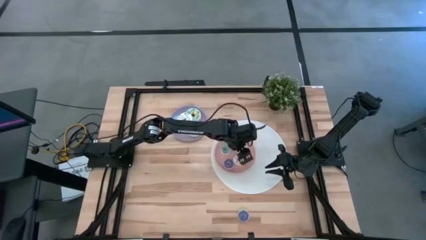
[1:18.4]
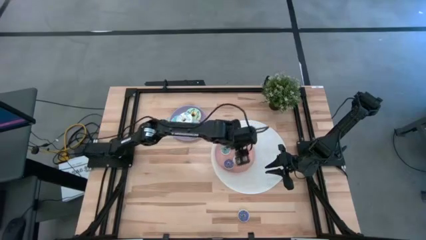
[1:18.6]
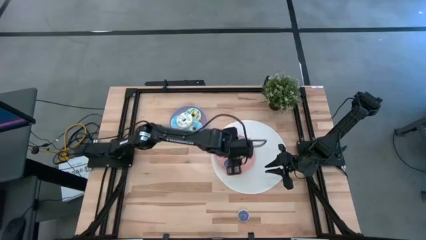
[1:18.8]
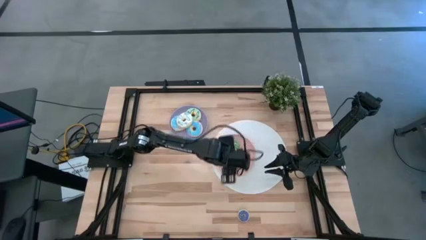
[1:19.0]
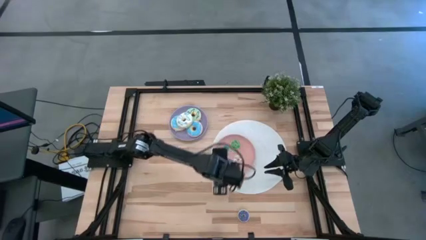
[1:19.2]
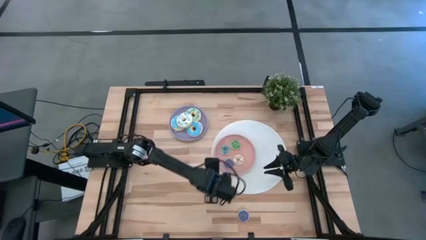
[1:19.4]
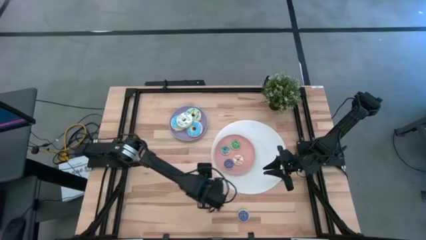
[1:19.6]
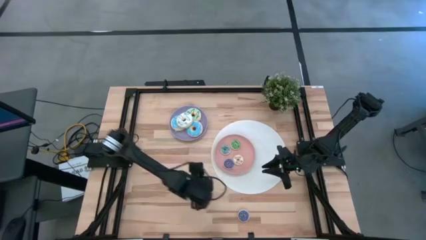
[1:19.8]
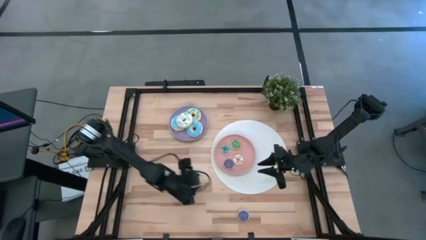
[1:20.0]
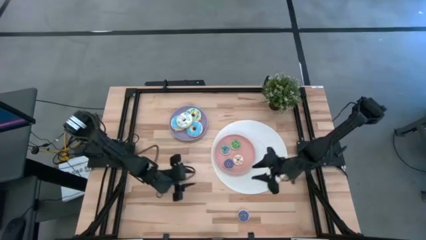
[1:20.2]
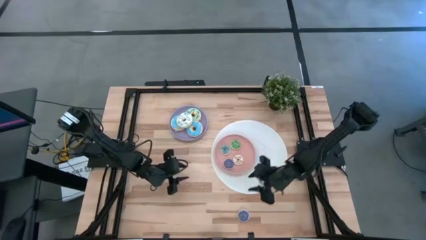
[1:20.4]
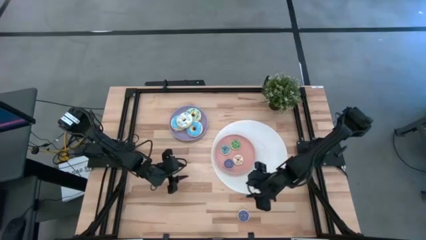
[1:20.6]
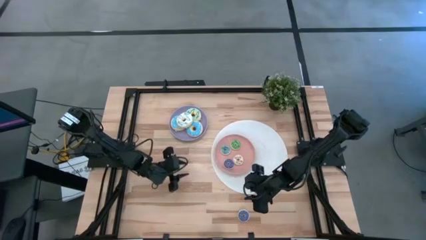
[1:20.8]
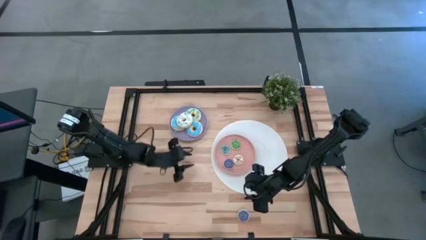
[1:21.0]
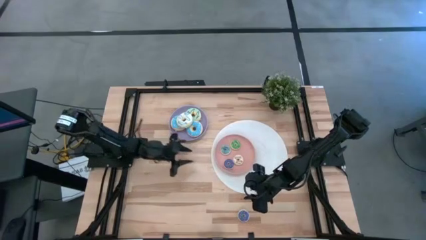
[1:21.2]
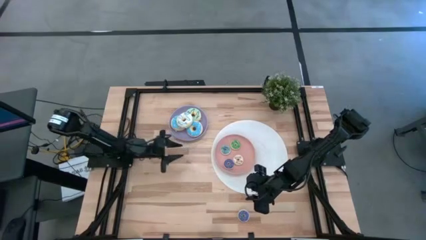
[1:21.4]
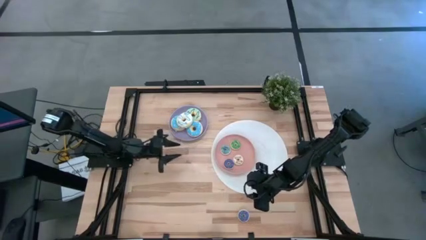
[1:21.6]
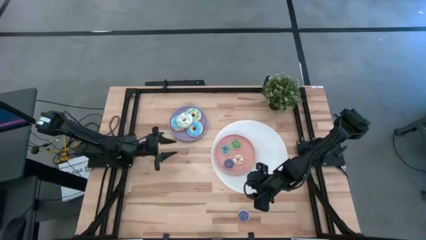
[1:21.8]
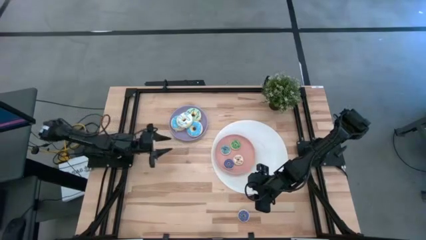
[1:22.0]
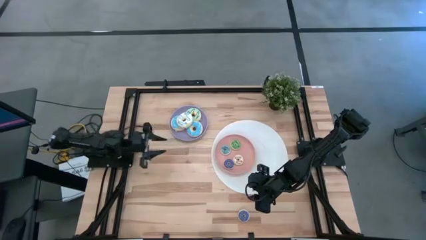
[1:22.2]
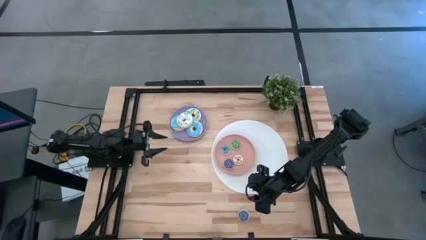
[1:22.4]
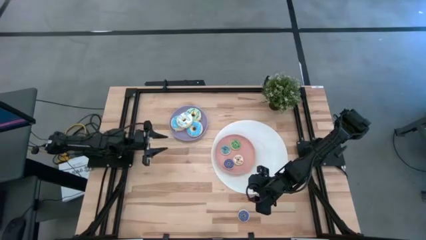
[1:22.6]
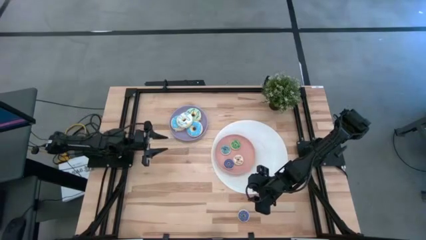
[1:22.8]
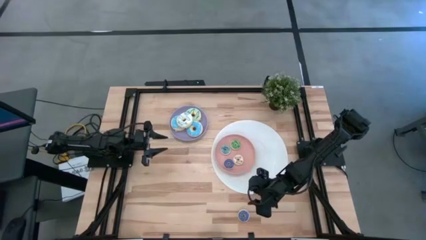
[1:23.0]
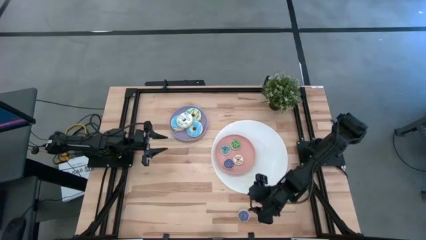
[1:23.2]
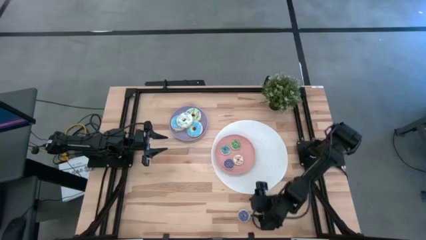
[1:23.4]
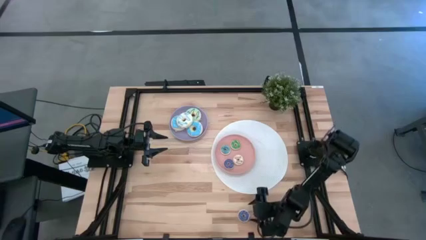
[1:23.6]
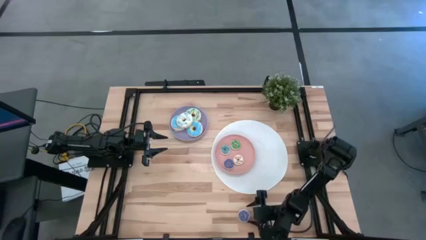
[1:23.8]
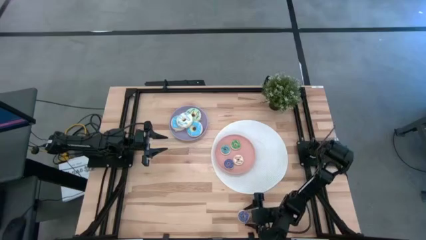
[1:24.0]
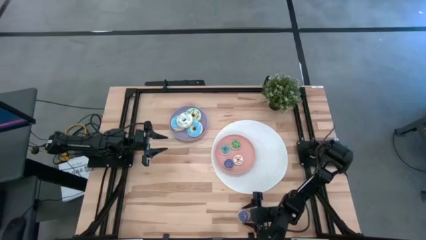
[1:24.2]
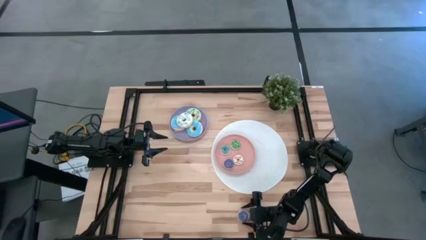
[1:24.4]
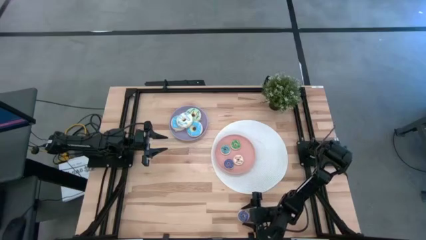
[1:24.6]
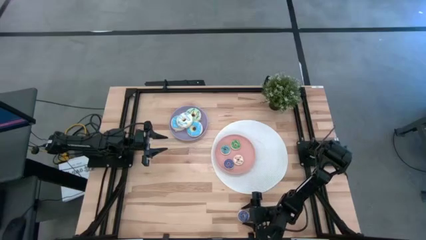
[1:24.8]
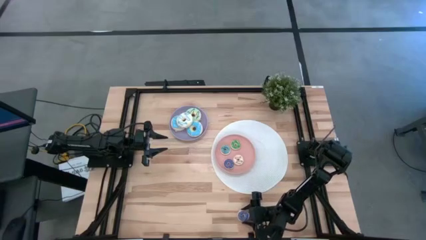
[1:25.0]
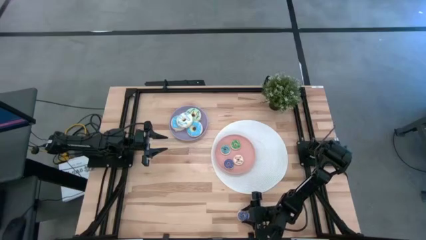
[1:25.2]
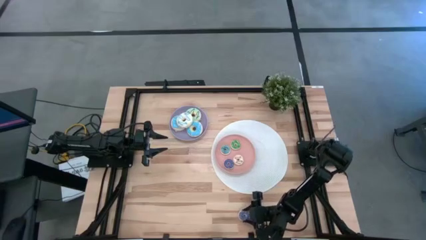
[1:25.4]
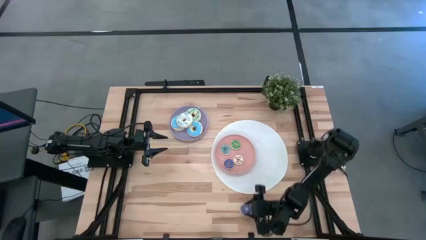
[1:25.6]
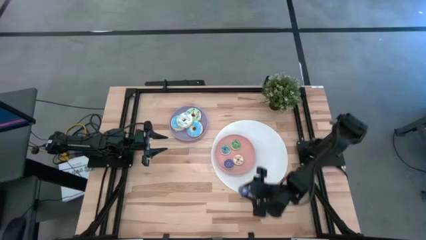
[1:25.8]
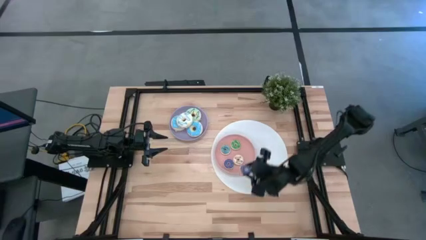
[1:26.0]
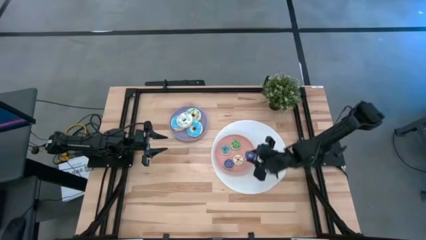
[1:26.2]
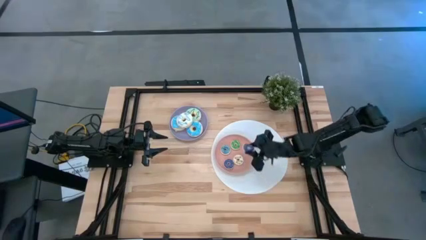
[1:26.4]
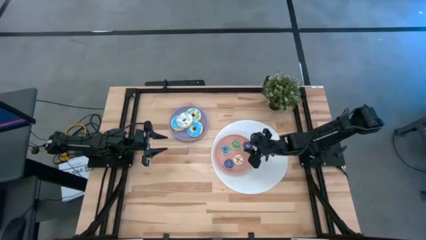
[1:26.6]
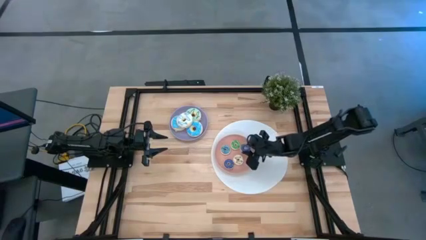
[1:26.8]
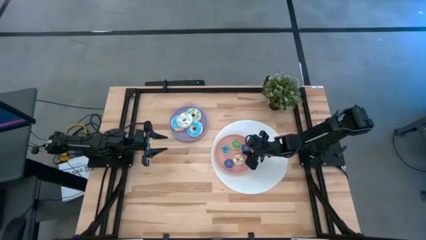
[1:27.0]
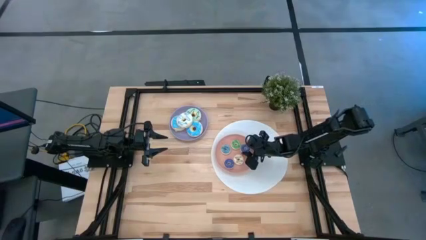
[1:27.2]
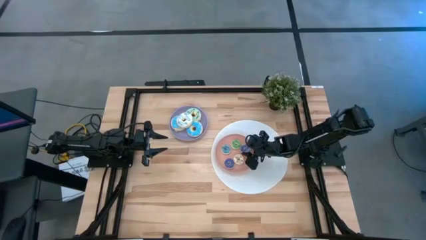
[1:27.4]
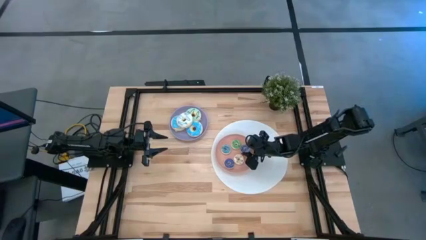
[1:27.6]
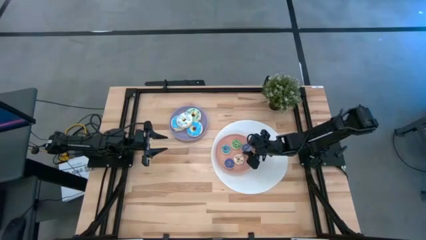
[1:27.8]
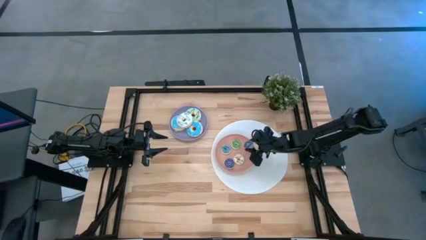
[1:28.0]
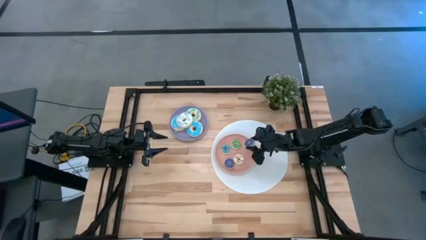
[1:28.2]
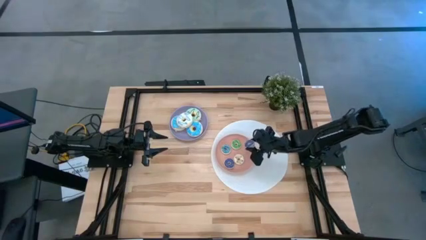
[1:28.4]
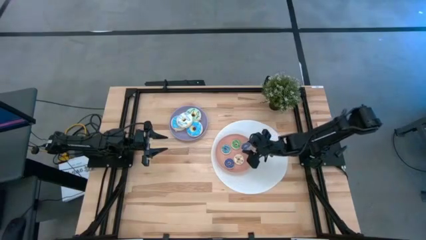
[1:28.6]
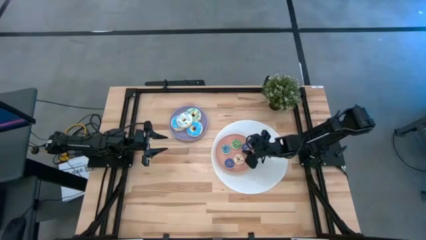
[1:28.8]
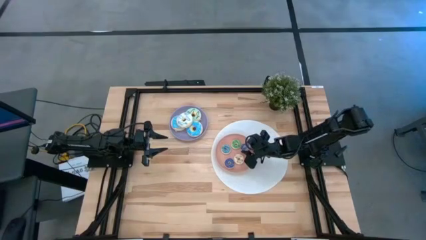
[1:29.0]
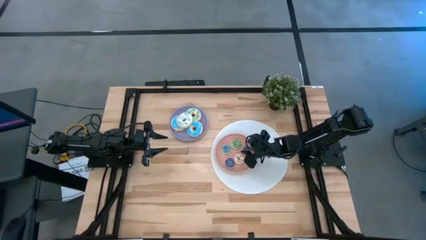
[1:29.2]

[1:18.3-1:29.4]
Task: Pick & Place donuts
Put the small violet donut on the pink plate

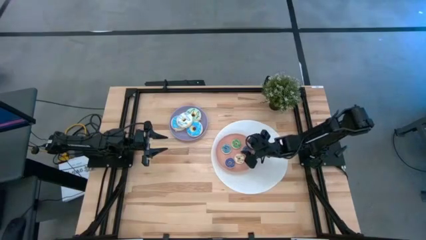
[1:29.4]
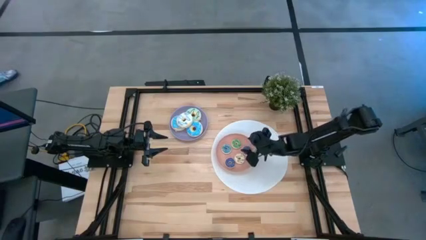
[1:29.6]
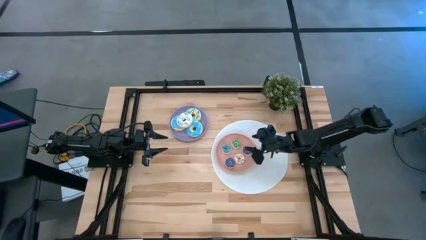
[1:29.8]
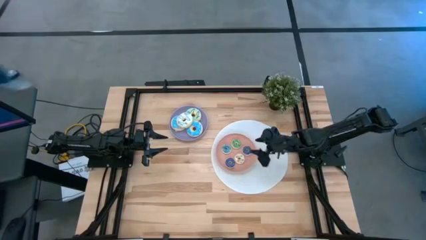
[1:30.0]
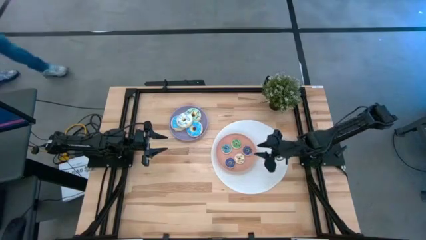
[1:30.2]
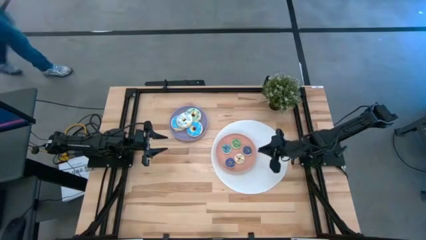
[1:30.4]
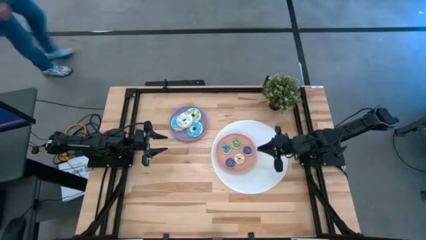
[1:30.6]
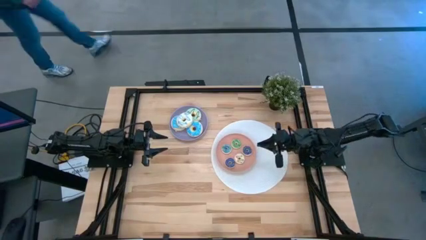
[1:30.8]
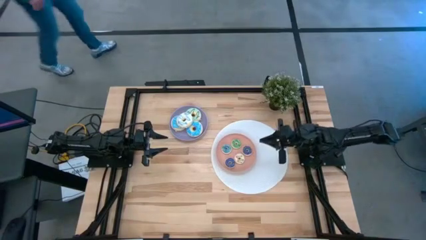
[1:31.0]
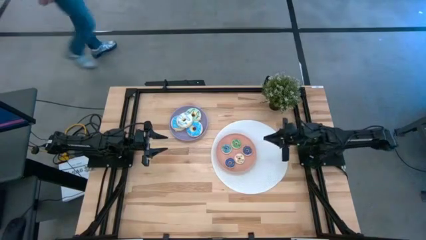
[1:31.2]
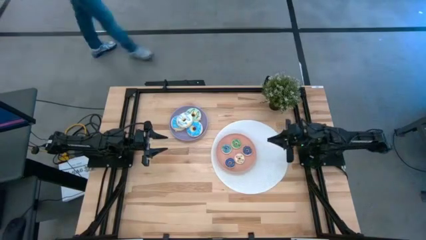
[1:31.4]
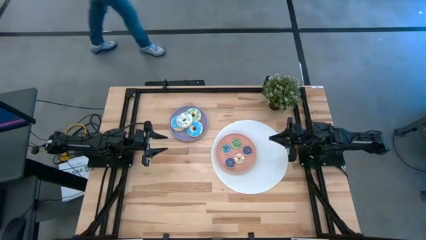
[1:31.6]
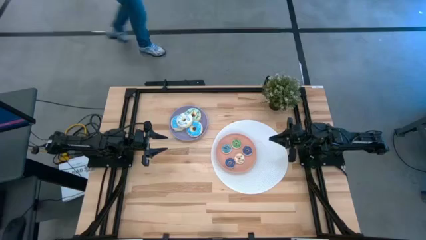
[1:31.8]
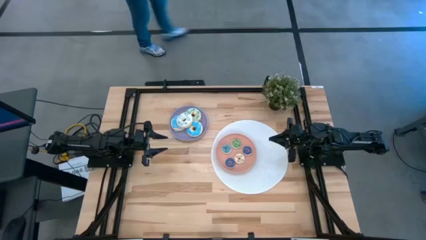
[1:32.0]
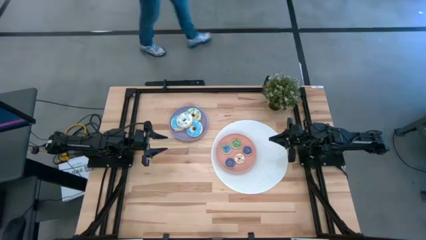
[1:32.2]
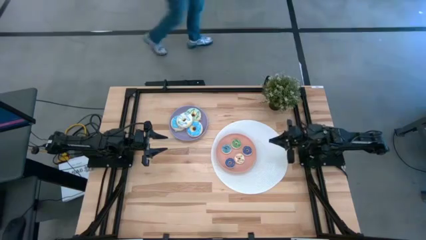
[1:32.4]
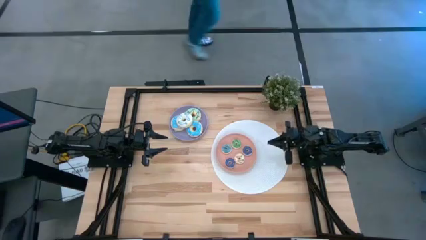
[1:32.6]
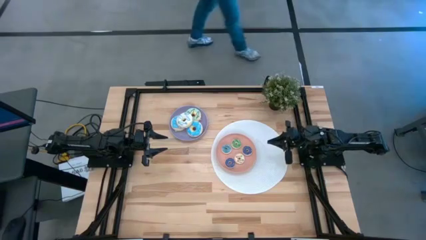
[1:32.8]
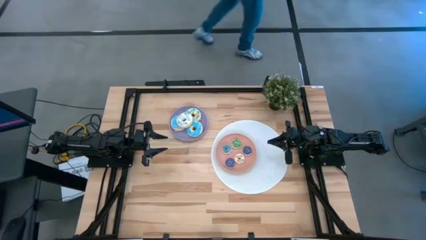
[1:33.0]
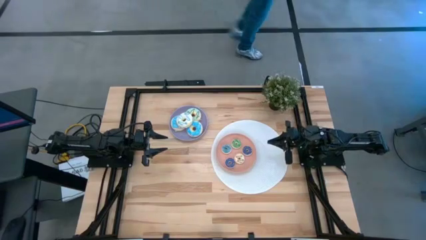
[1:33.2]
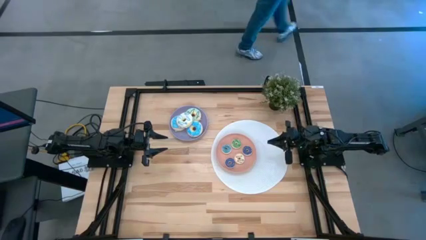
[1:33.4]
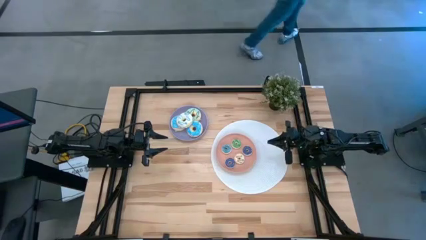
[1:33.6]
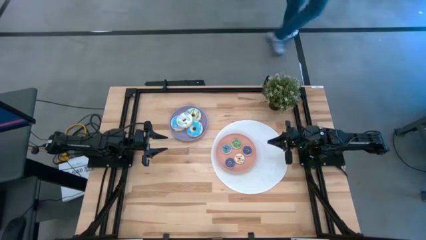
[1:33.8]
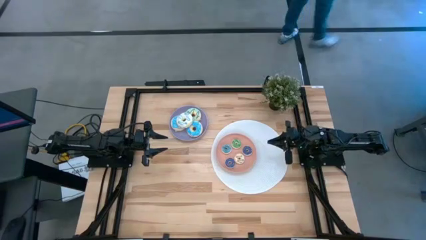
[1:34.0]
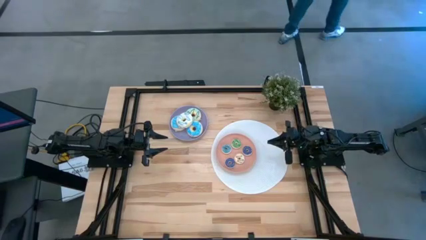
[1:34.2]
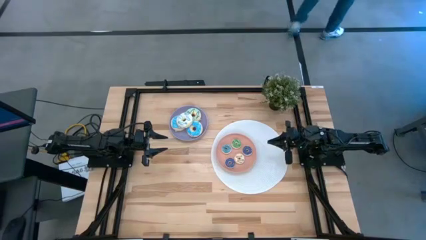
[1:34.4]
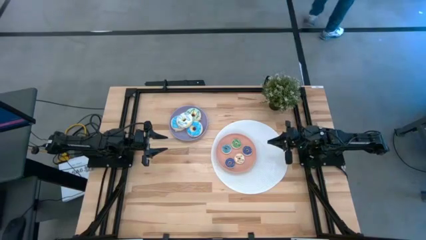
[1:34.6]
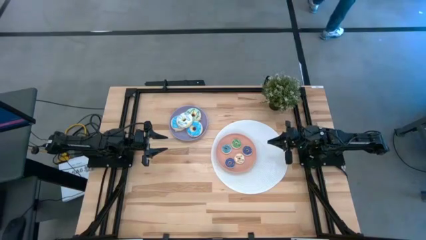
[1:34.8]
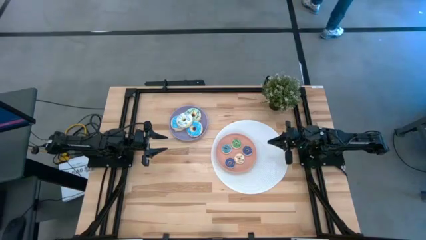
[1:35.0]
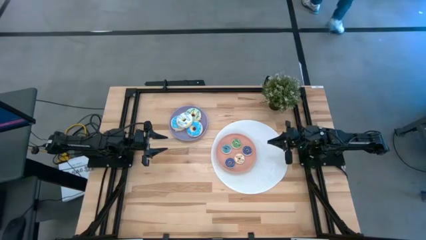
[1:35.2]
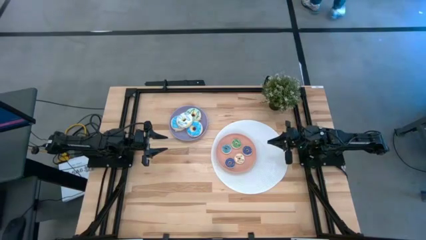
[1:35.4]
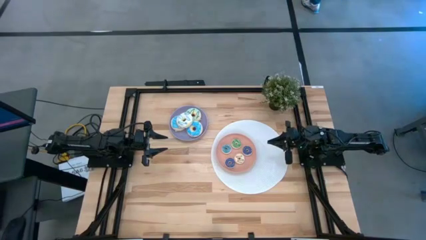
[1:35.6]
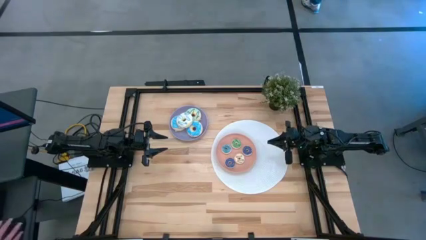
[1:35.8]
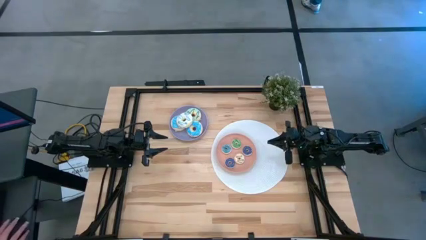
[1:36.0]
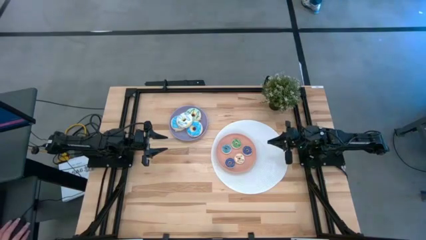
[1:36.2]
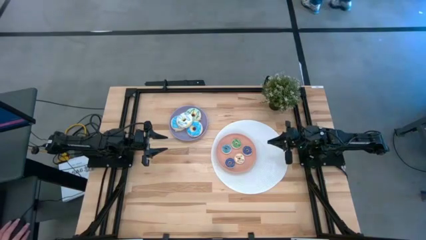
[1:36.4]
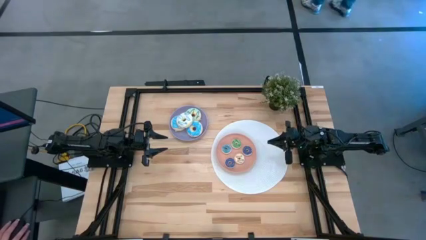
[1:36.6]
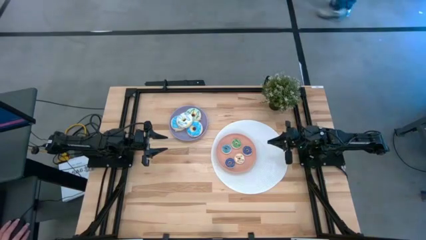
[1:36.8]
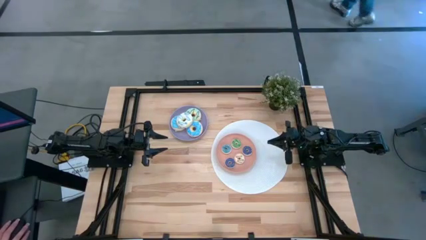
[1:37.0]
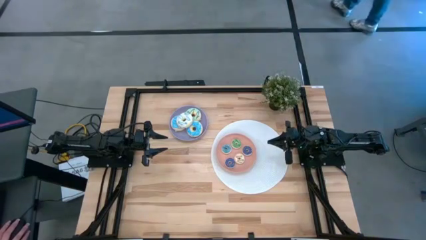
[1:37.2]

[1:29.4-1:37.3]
Return to Home Position
